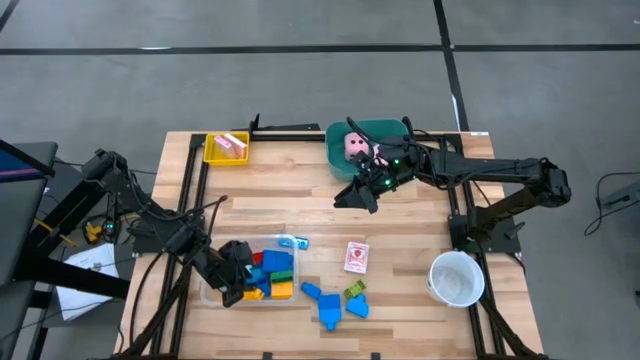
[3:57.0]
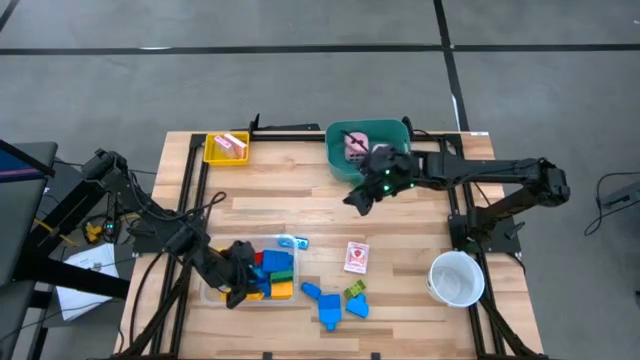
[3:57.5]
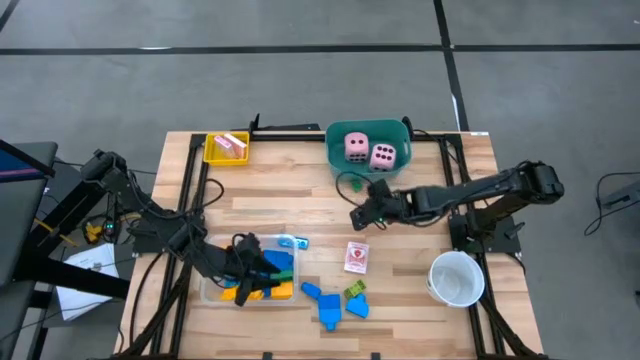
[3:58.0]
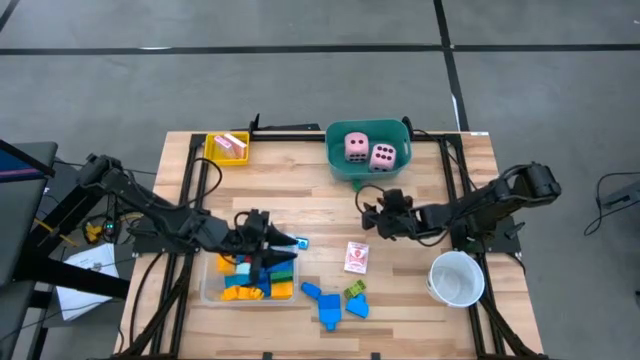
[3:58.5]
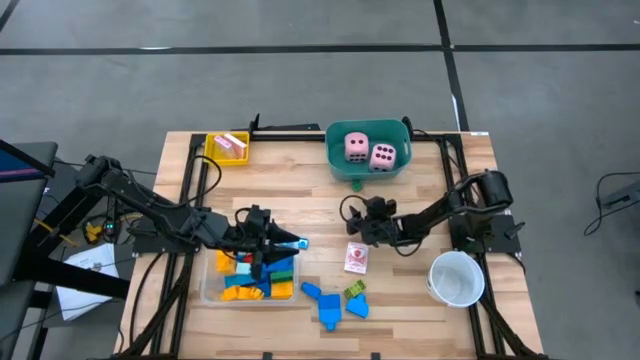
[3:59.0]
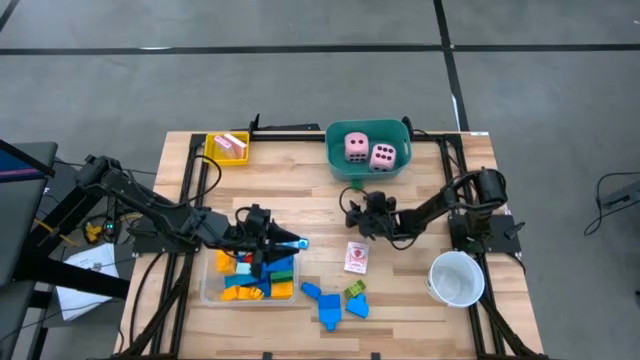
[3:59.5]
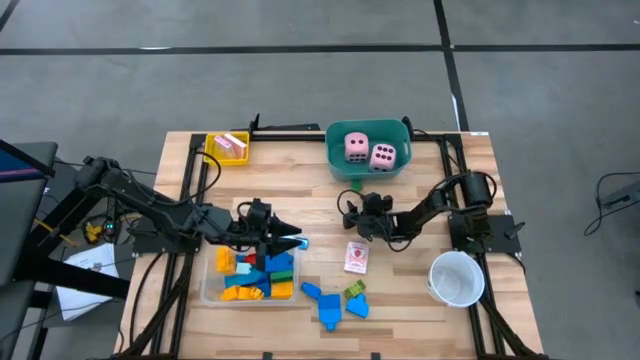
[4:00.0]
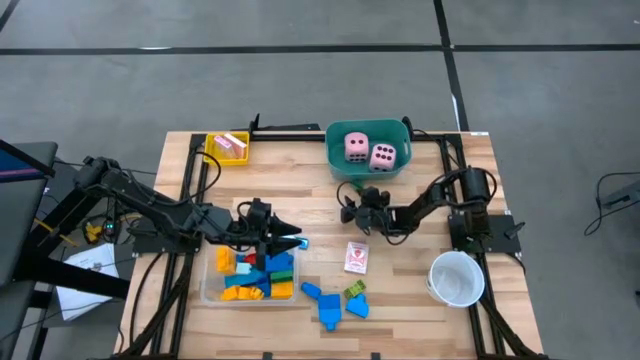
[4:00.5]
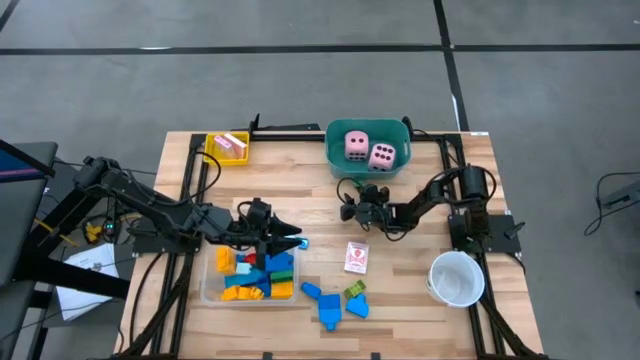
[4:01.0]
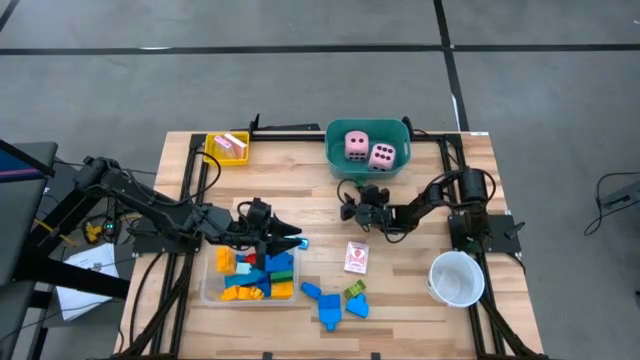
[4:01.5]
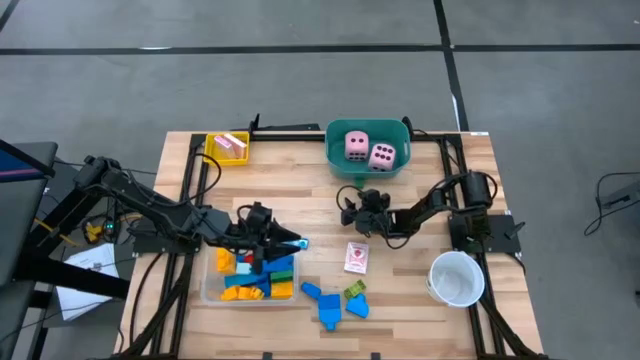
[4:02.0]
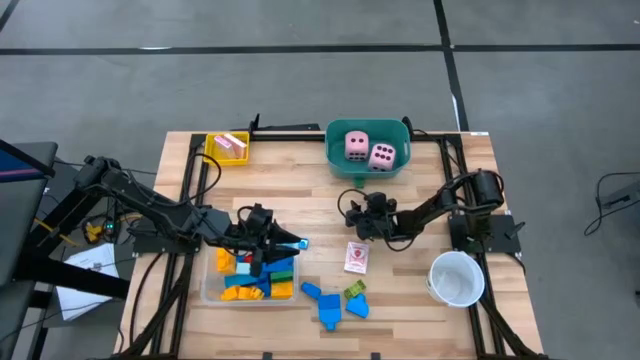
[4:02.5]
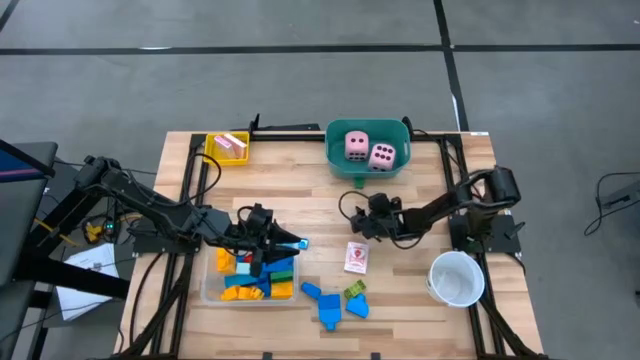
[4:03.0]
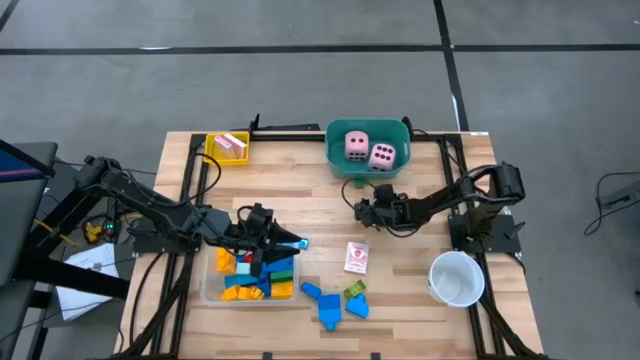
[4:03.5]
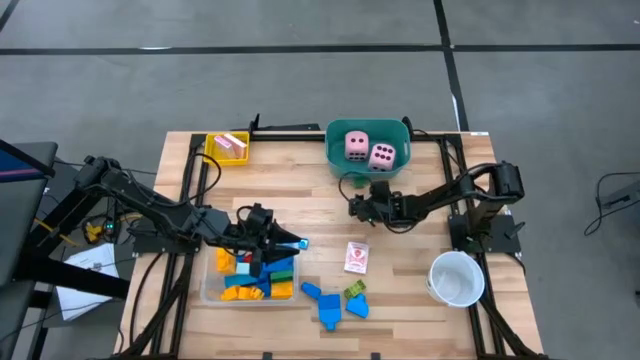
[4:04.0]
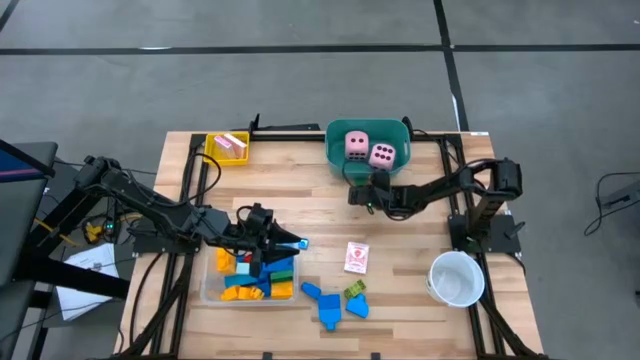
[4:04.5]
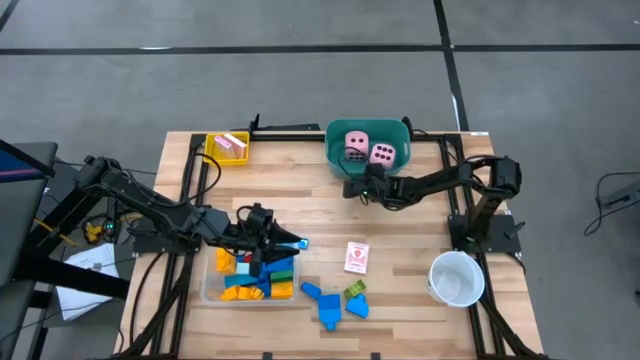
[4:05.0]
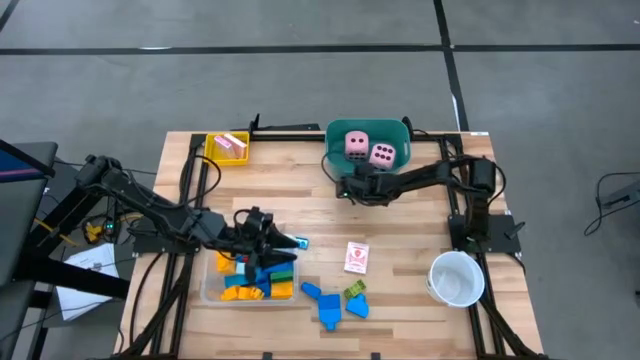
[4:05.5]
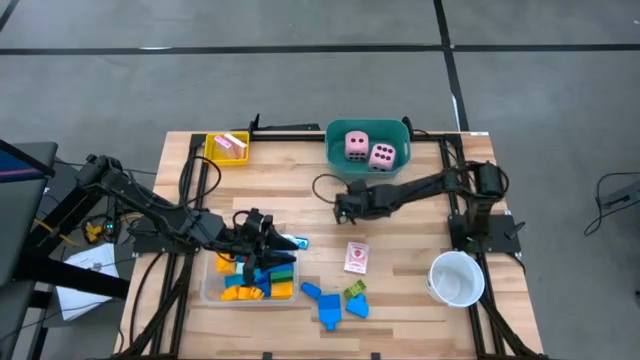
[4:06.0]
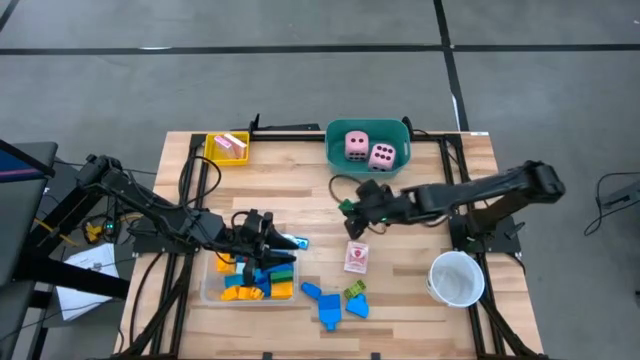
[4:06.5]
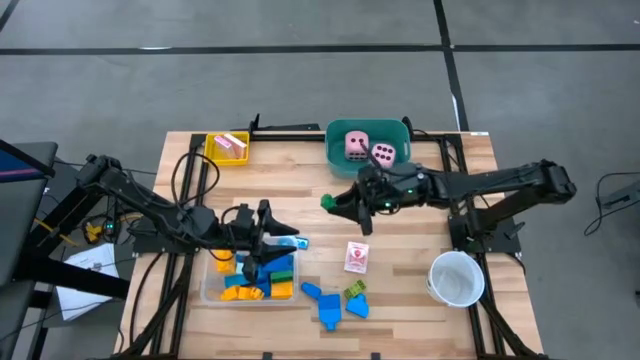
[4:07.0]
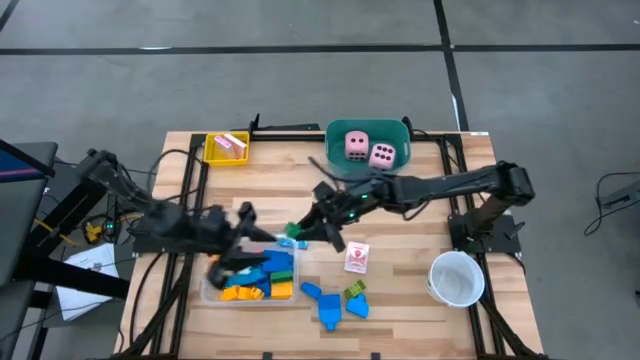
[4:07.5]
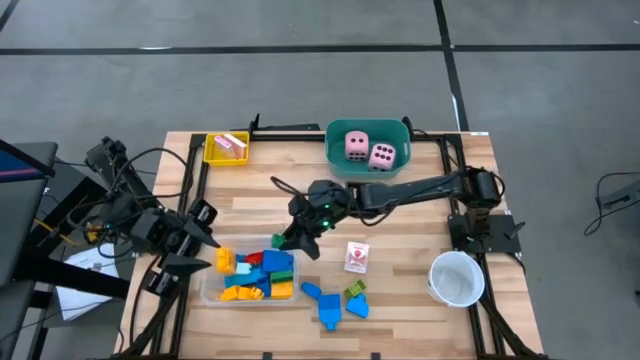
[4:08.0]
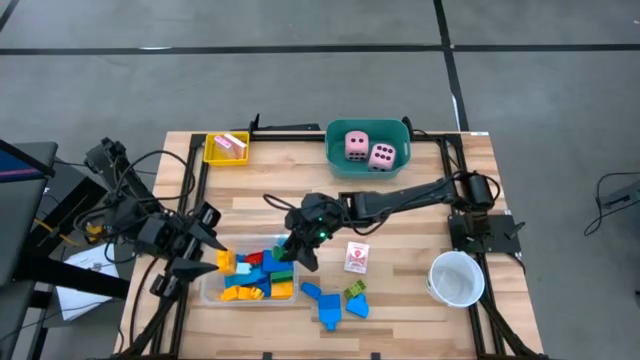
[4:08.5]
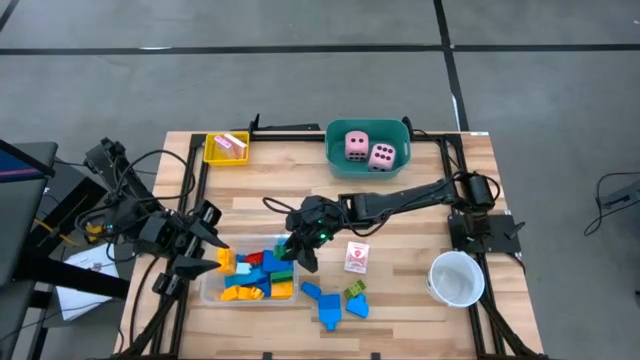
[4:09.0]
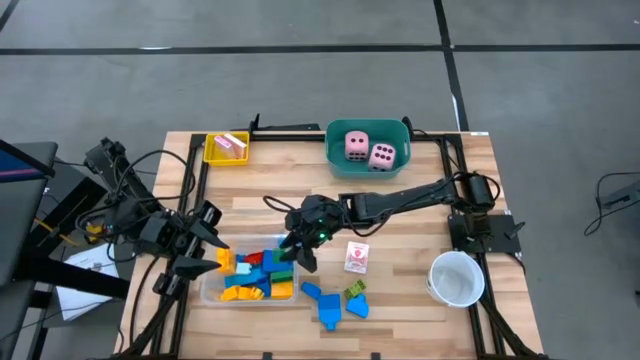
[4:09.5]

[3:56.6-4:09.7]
Task: Pick & Place Toys
Put the green game piece into the transparent bin

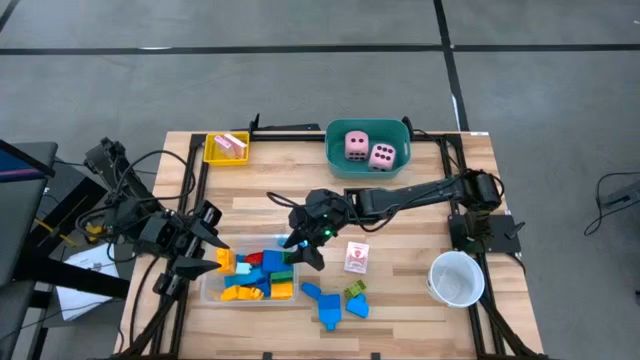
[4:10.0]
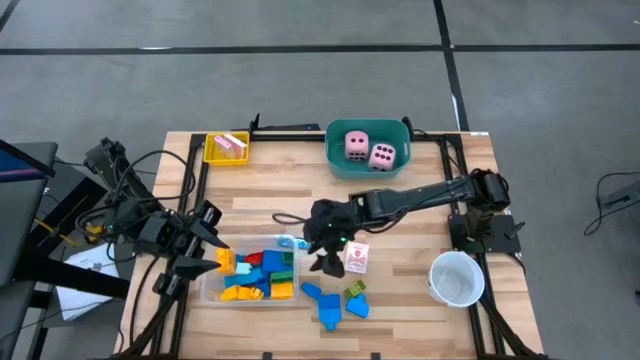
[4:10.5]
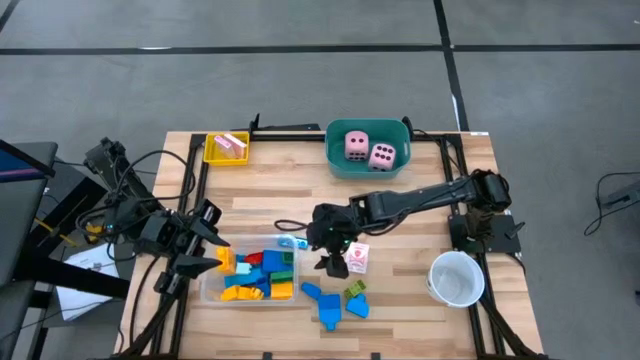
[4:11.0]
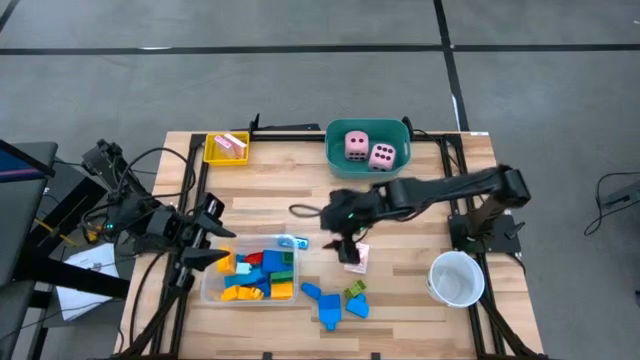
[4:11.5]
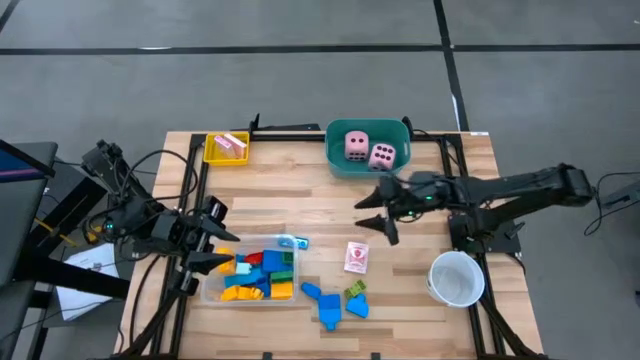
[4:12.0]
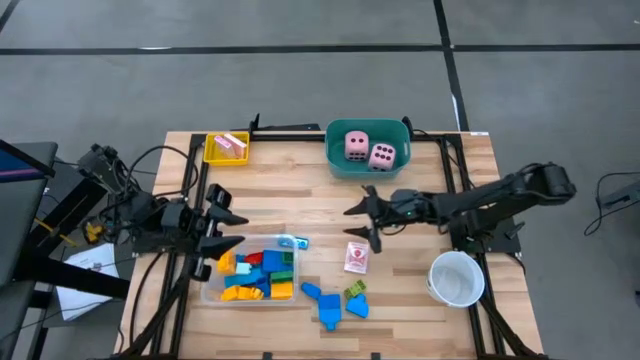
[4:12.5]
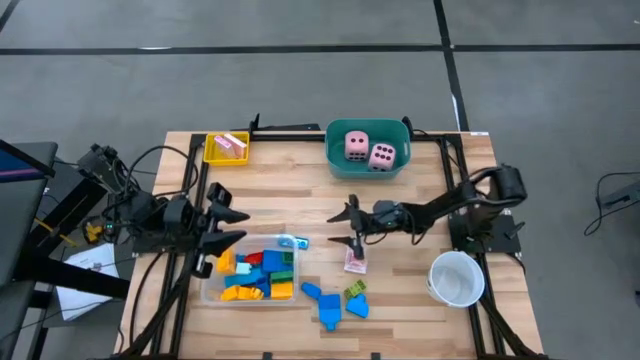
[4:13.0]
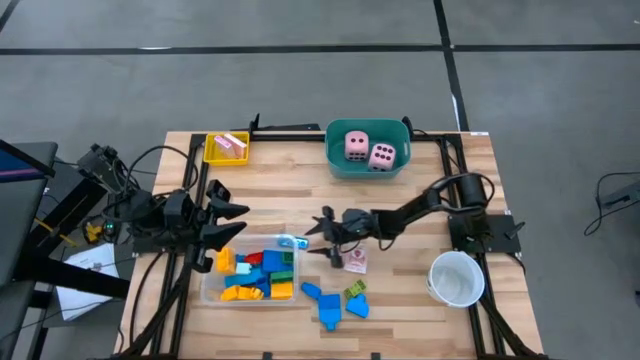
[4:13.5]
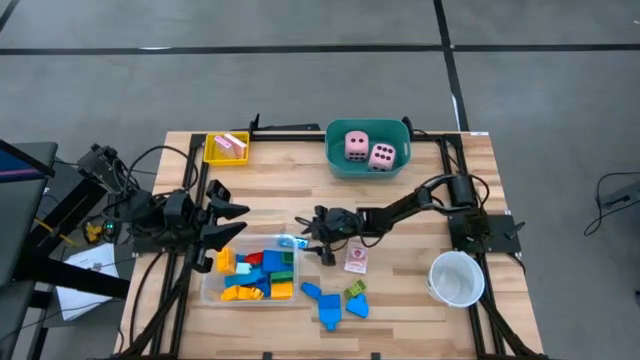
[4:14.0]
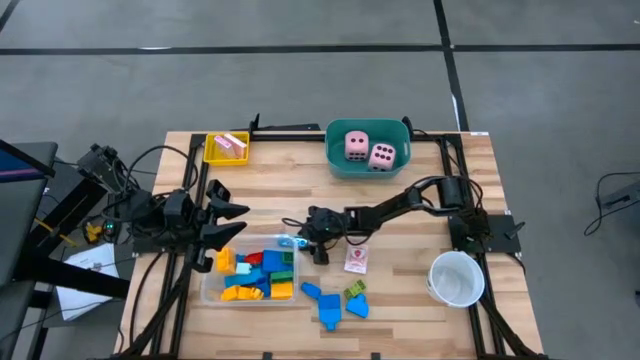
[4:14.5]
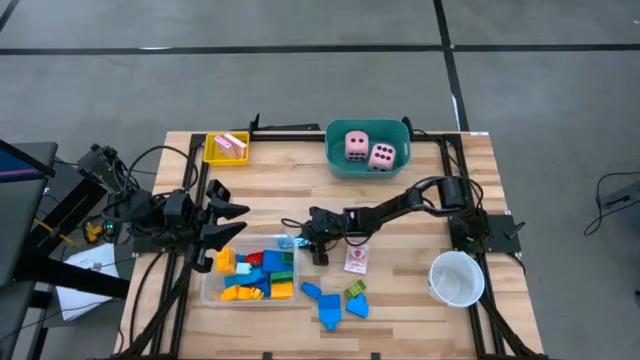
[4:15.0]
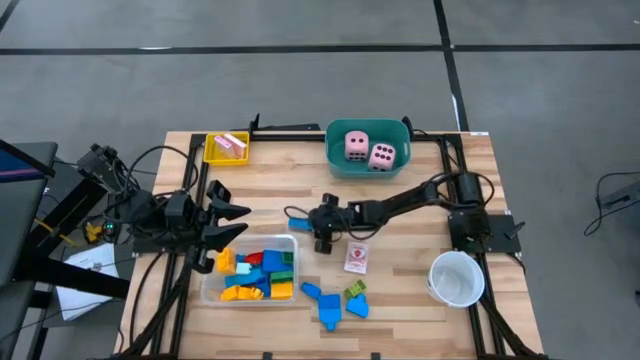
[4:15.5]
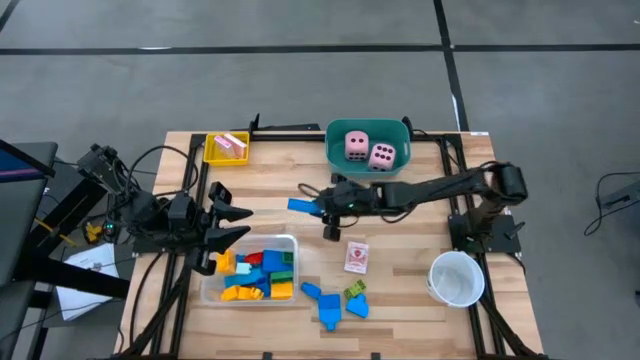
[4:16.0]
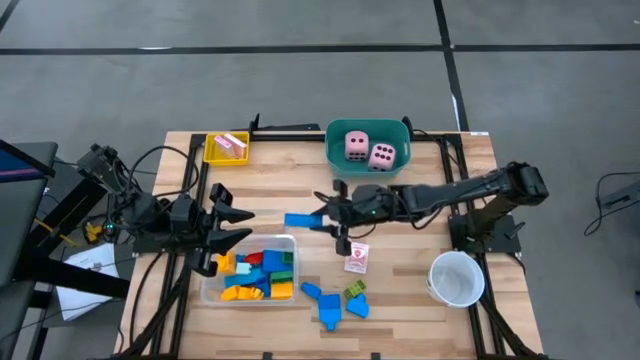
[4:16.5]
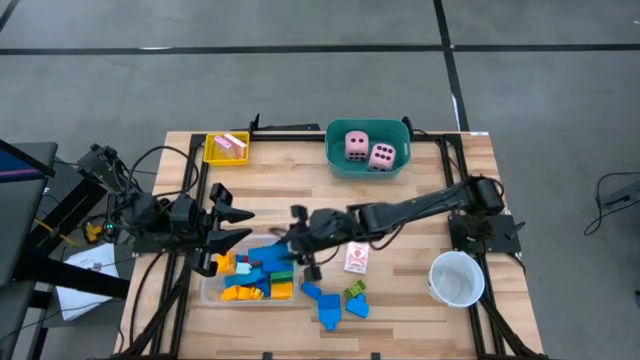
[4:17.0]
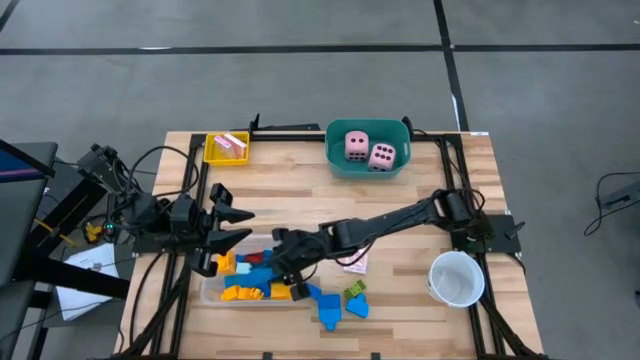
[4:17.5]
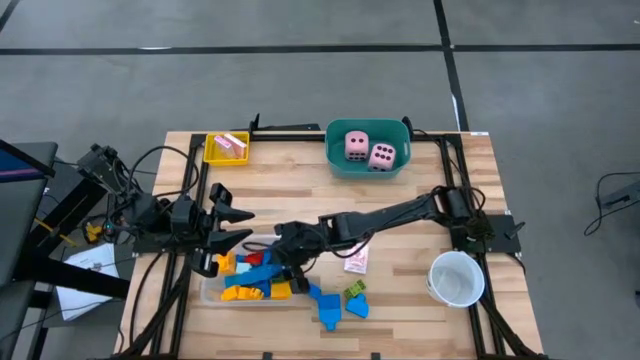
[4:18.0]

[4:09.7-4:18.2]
Put the blue game piece into the transparent bin
